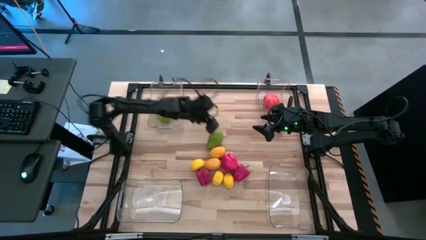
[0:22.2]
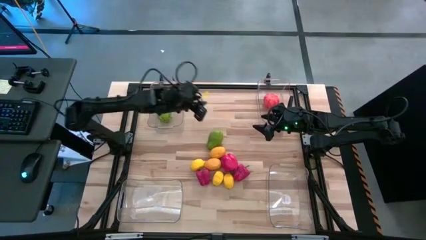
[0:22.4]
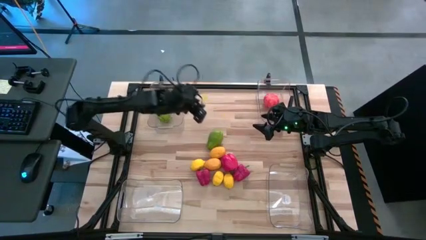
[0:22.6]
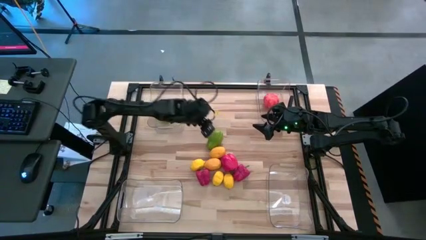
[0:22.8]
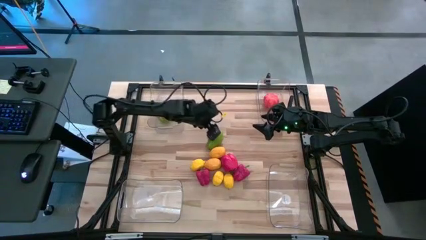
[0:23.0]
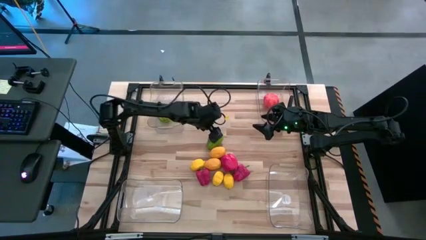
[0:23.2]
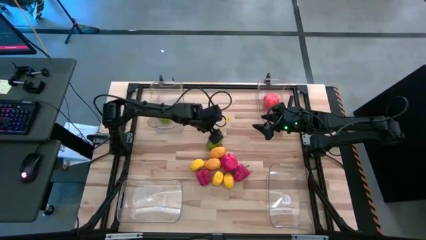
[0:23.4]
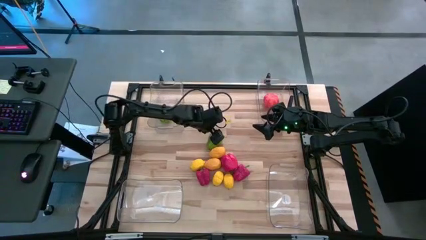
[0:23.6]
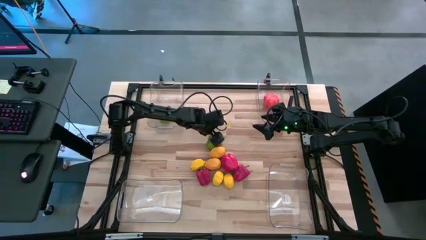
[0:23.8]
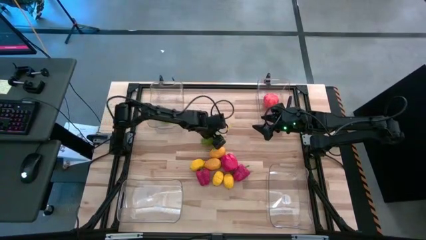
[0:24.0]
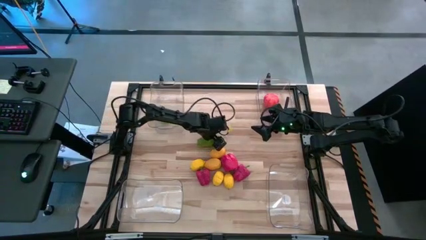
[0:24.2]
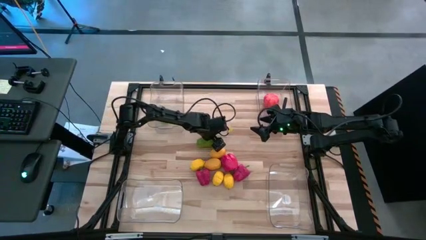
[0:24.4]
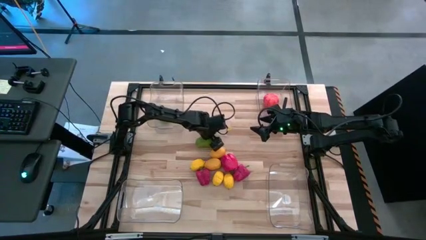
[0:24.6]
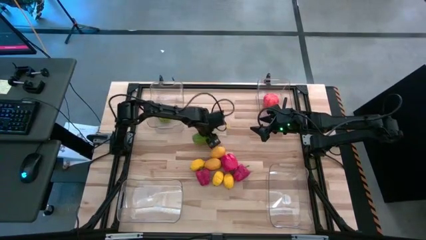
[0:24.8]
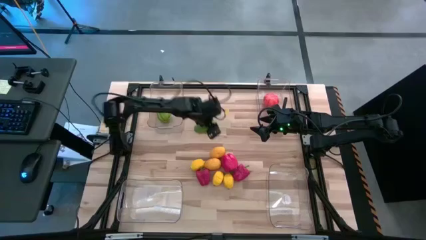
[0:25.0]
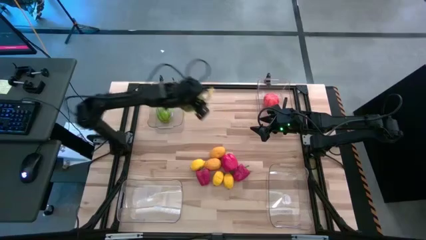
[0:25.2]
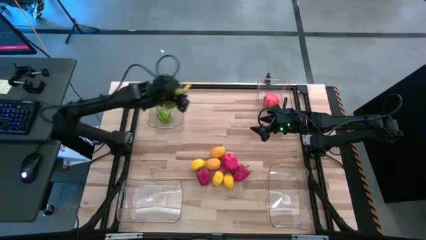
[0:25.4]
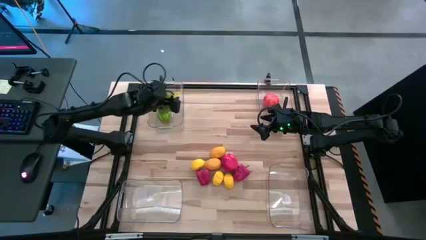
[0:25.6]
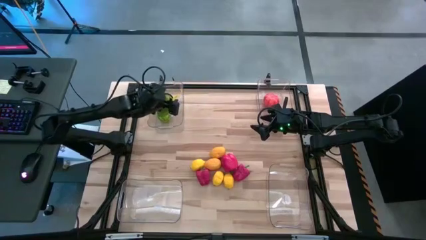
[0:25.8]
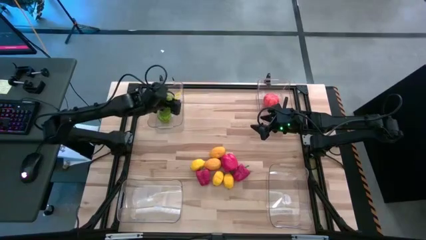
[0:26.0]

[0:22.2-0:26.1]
Task: Sort produce into baskets
Put the green chayote into the top left transparent bin

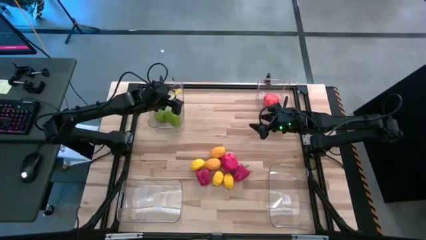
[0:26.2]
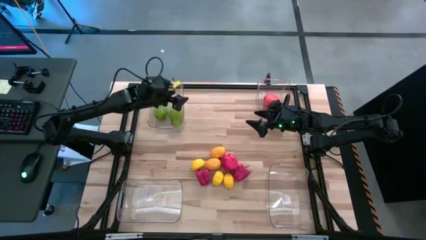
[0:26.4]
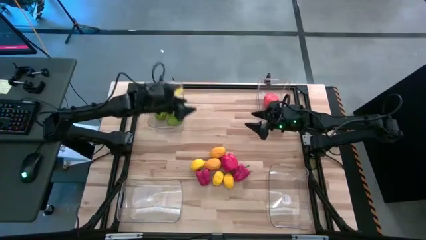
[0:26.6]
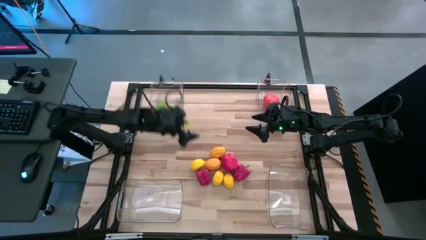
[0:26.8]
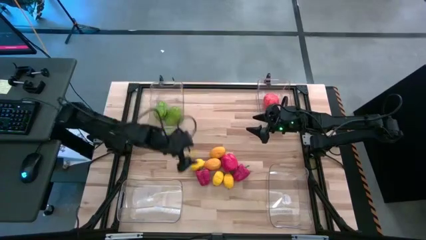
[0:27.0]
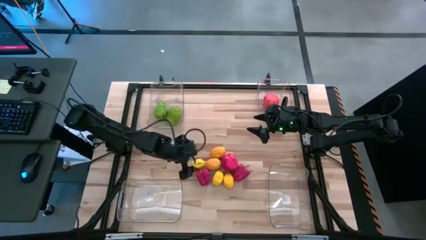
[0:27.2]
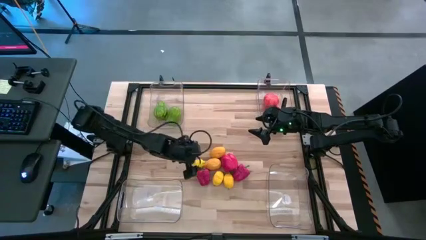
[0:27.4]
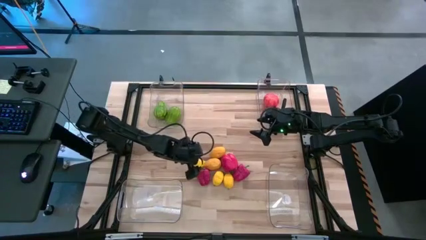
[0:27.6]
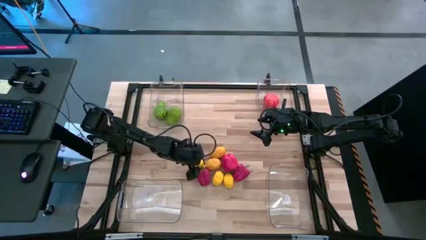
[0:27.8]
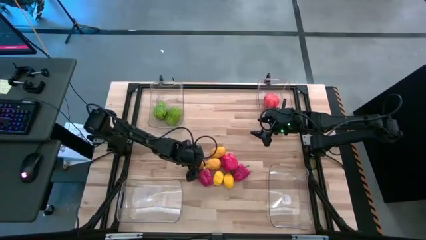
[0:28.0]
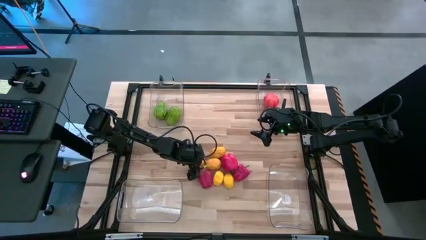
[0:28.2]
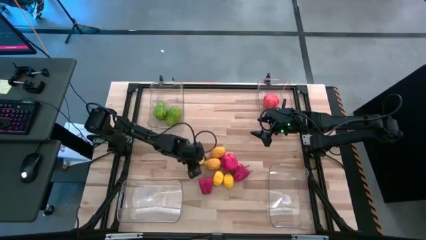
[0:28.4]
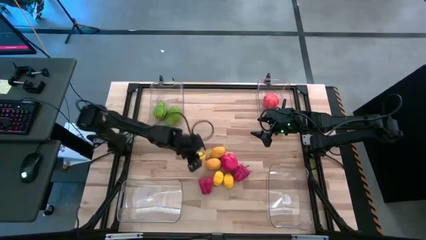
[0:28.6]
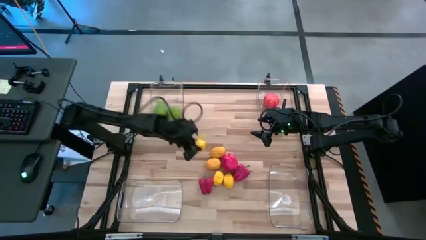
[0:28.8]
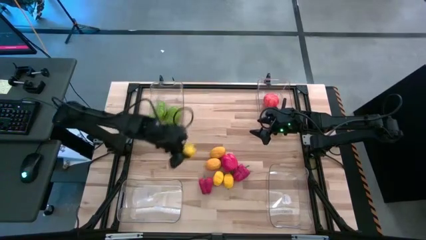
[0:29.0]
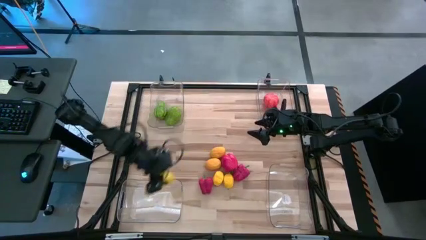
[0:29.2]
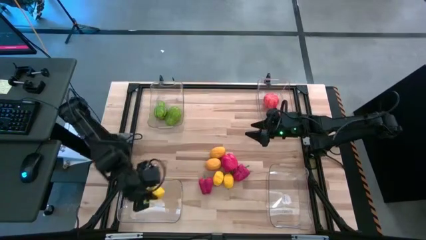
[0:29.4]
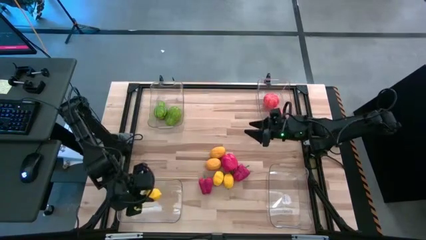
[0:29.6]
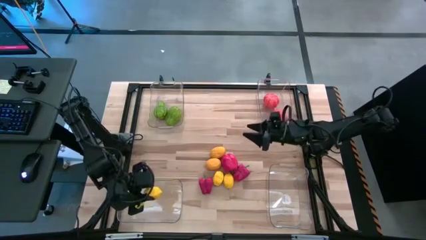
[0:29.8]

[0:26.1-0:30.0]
Put the yellow lemon into the bottom left transparent bin

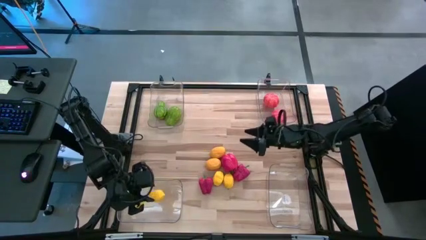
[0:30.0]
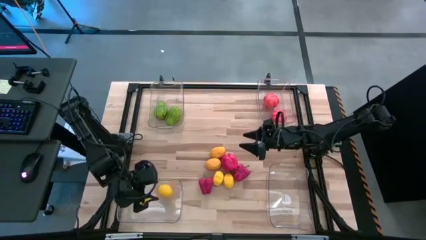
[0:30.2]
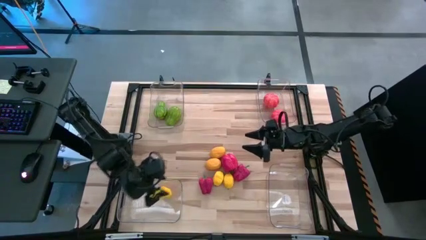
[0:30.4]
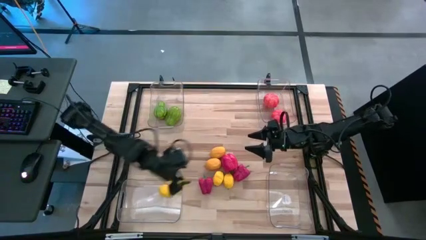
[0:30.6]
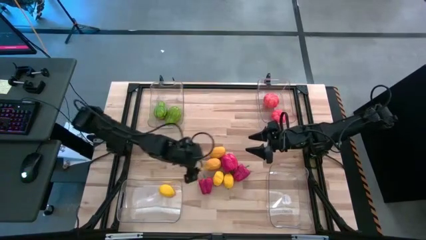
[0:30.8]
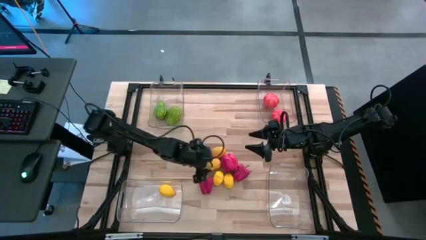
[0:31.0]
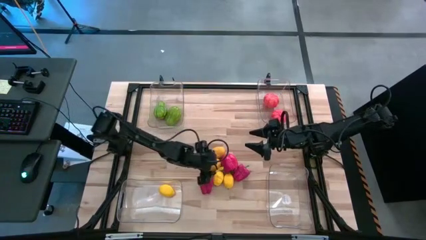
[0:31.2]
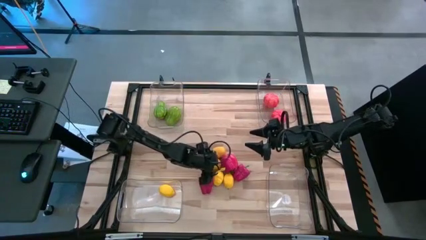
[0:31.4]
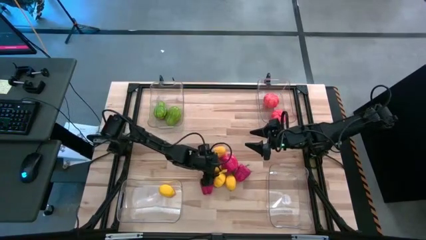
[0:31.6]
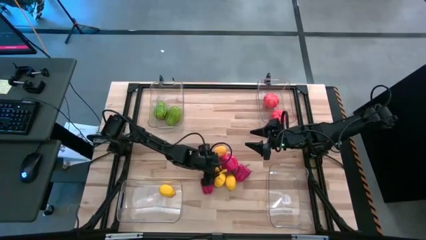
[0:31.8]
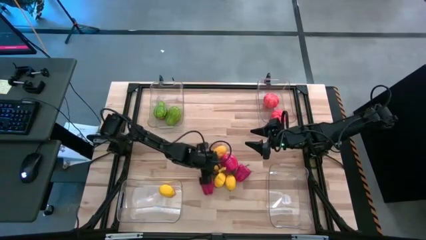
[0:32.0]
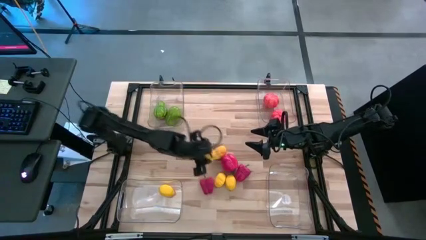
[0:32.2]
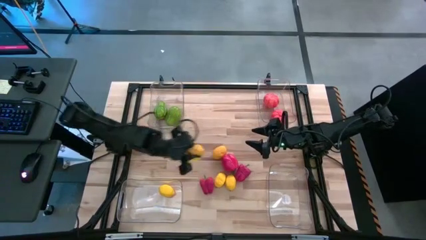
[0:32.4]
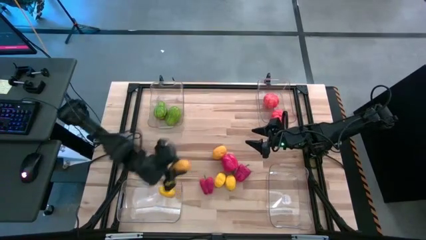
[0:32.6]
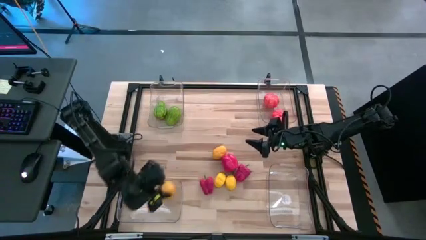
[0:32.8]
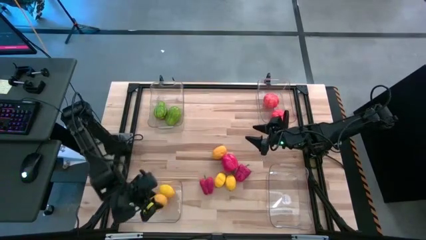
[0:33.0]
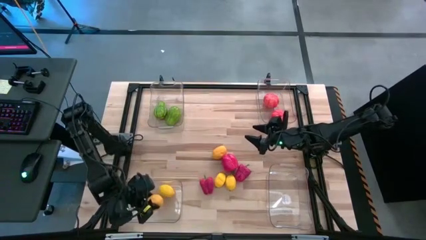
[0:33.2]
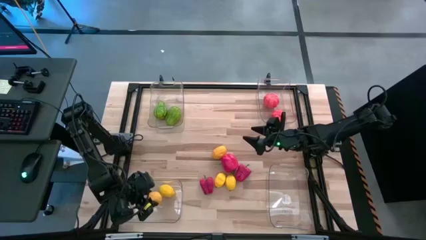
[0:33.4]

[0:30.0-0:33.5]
Put the yellow lemon into the bottom left transparent bin

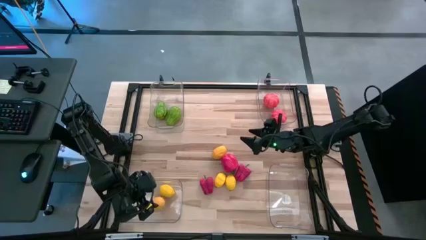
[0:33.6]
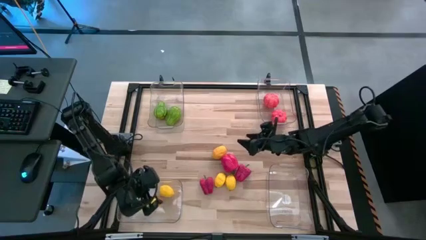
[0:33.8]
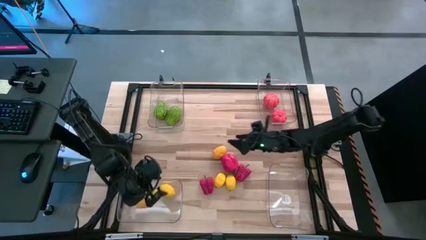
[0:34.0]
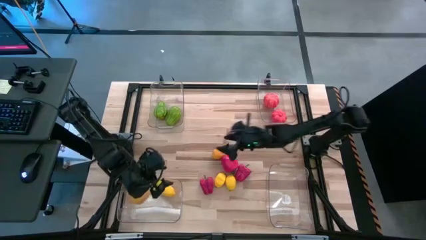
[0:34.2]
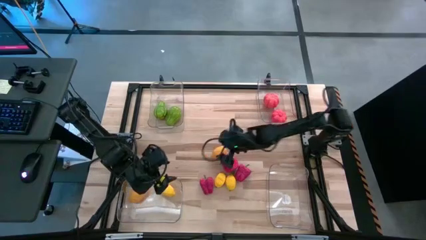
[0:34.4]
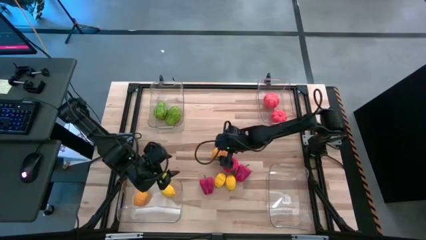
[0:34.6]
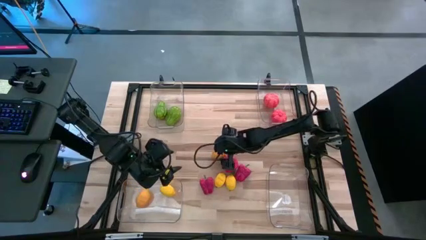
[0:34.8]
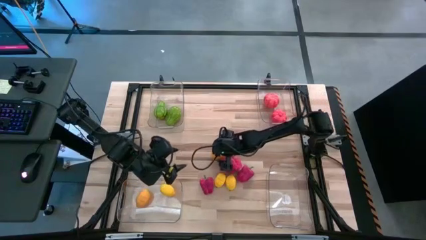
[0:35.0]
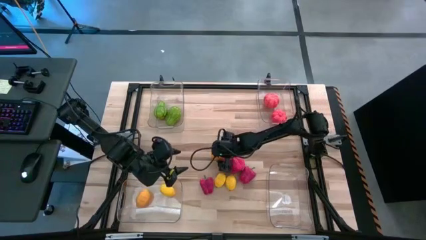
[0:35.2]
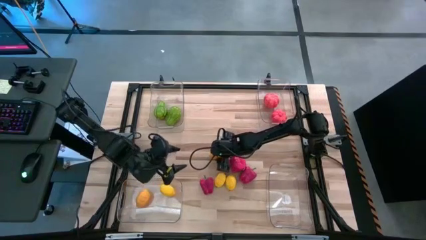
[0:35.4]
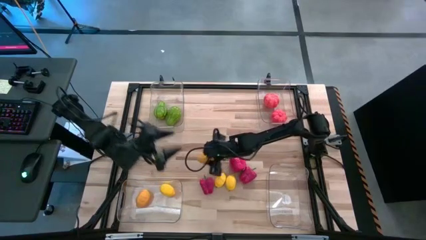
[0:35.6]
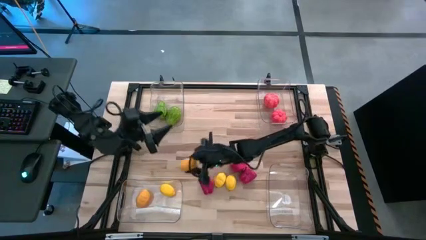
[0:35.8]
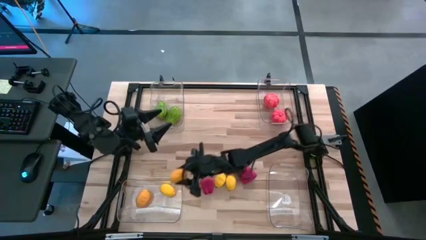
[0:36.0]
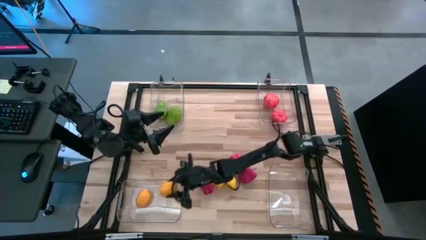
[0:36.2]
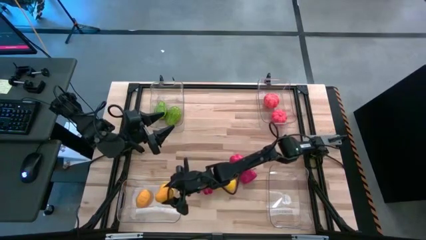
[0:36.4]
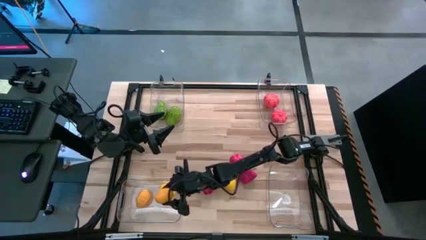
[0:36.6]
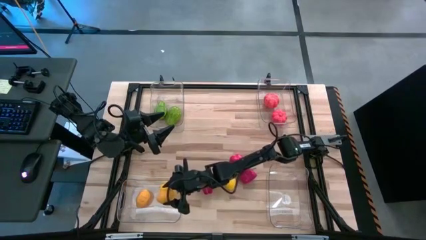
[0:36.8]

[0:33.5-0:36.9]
Put the yellow lemon into the bottom left transparent bin

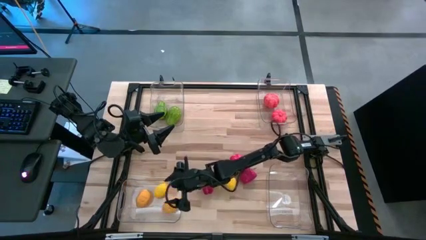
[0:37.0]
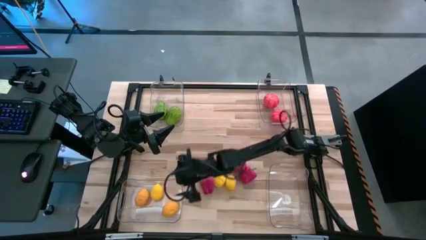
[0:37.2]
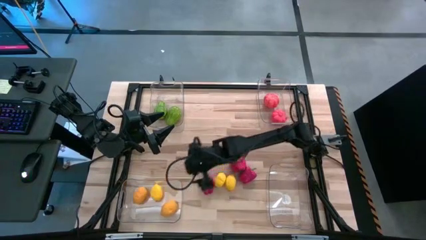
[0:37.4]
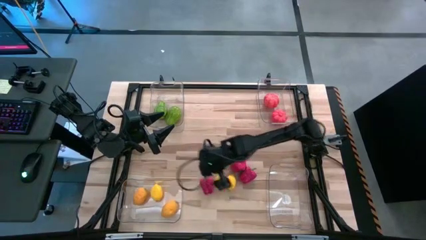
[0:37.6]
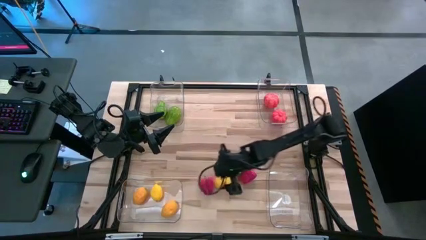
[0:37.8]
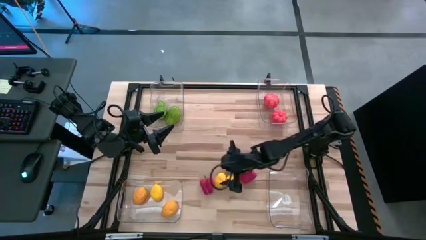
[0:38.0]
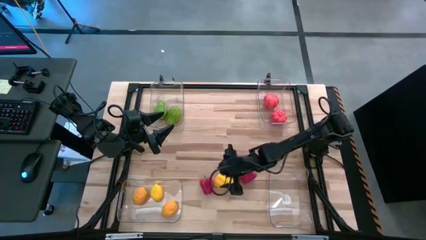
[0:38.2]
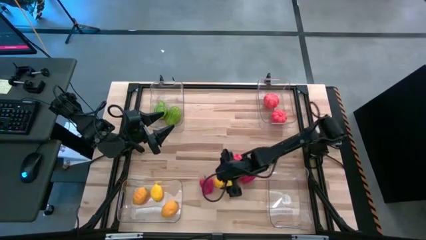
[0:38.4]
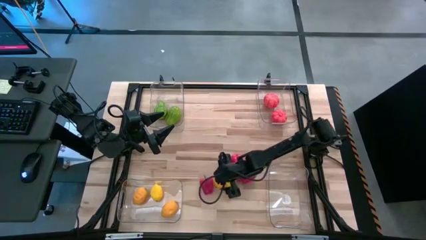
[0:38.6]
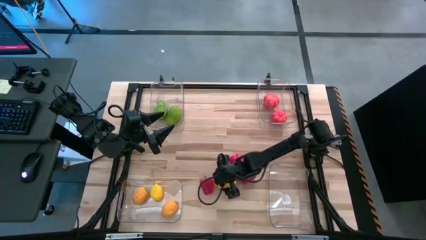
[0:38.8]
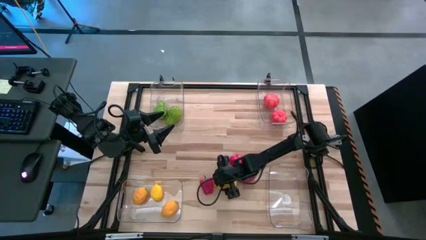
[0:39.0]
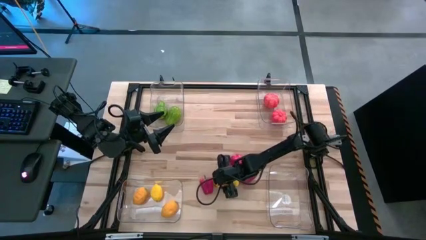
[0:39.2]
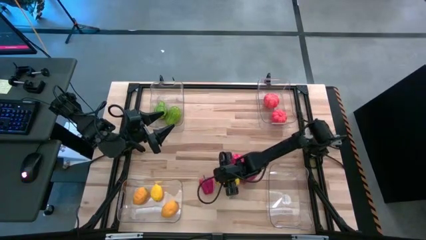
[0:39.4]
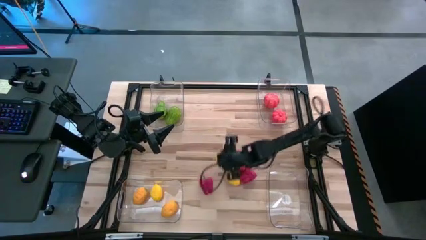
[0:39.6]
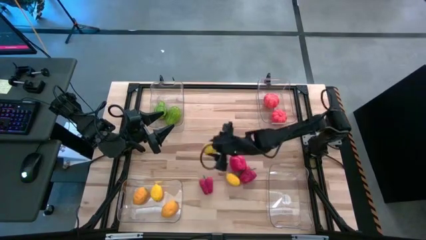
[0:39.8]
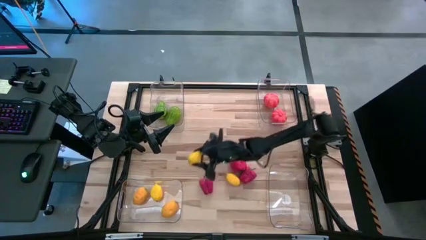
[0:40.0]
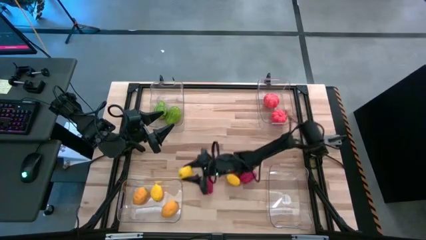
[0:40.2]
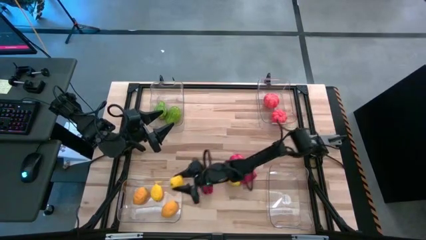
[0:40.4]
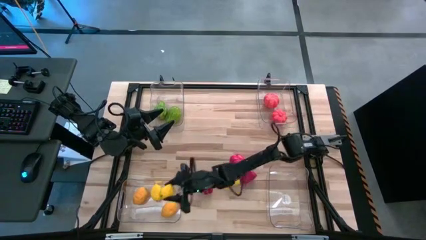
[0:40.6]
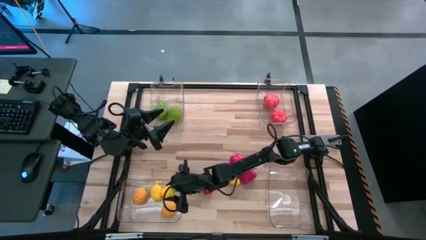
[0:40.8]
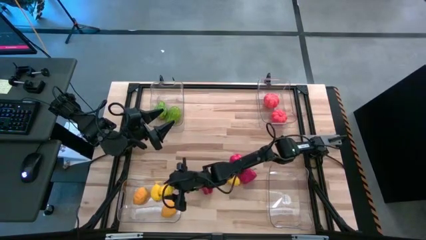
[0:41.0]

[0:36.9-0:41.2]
Put the yellow lemon into the bottom left transparent bin
